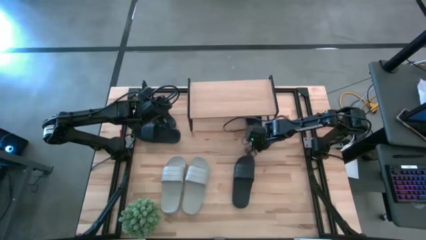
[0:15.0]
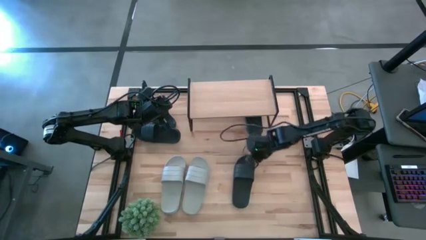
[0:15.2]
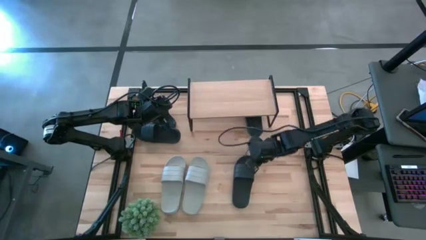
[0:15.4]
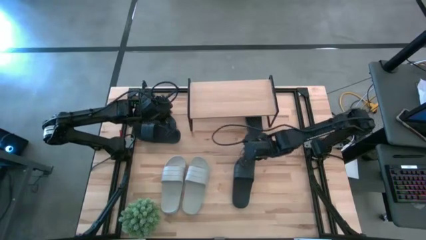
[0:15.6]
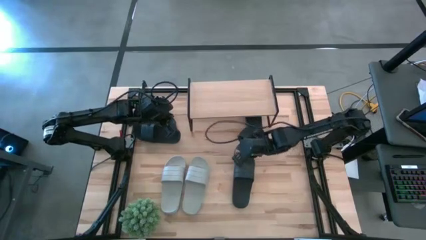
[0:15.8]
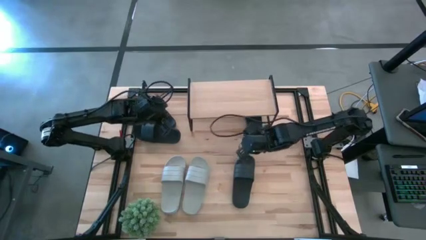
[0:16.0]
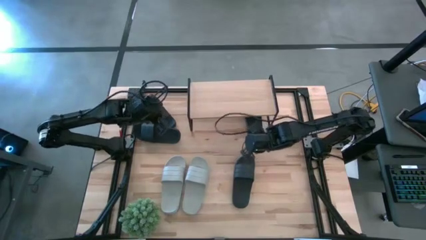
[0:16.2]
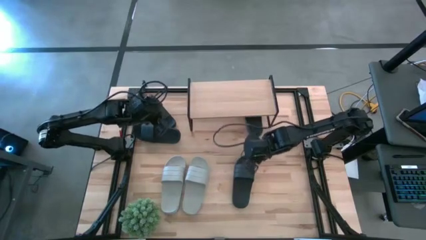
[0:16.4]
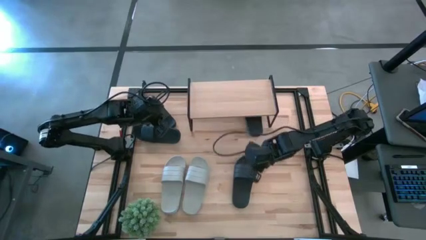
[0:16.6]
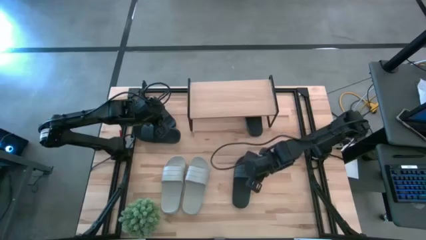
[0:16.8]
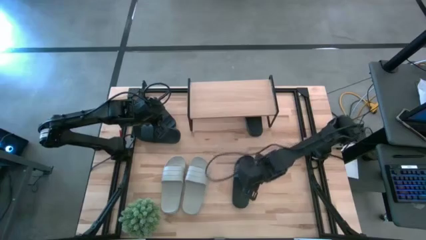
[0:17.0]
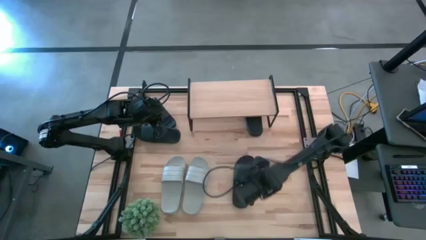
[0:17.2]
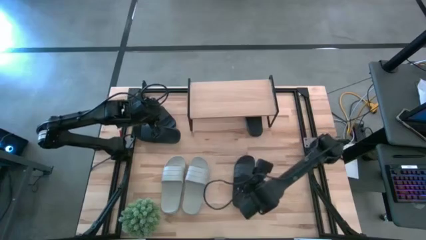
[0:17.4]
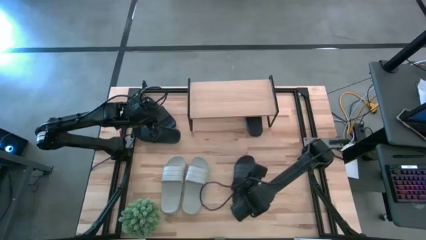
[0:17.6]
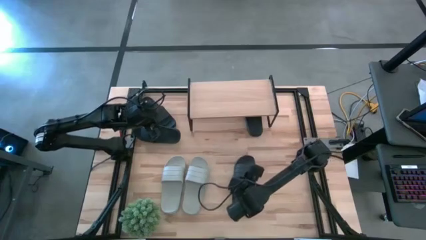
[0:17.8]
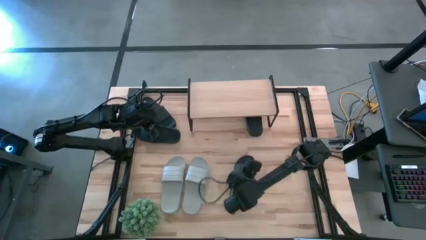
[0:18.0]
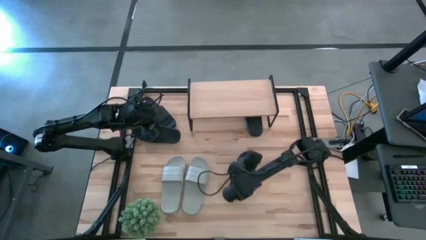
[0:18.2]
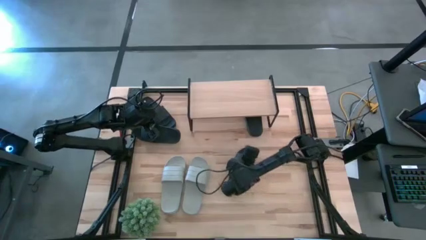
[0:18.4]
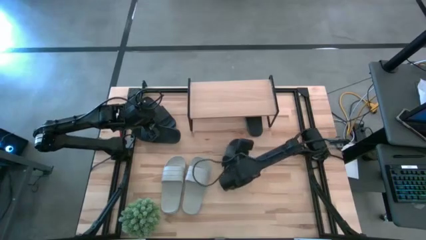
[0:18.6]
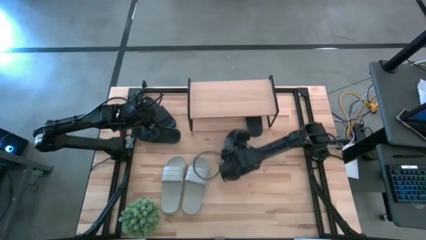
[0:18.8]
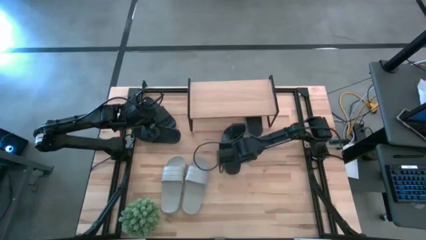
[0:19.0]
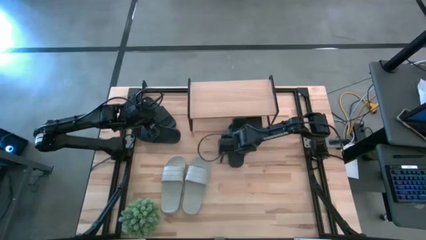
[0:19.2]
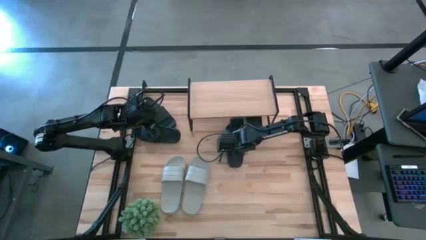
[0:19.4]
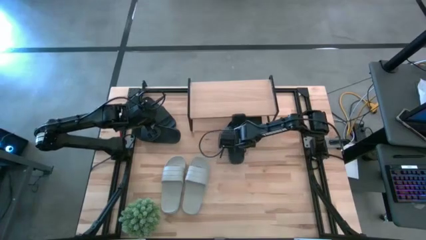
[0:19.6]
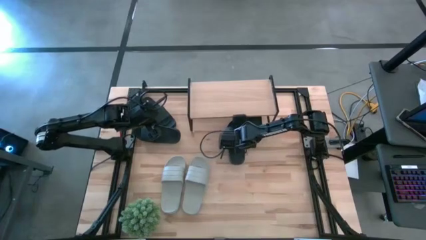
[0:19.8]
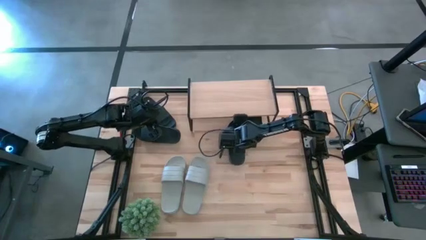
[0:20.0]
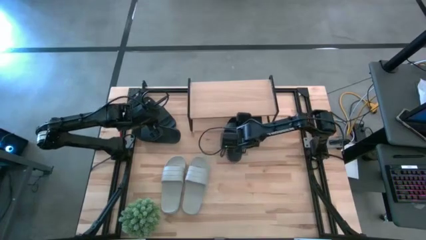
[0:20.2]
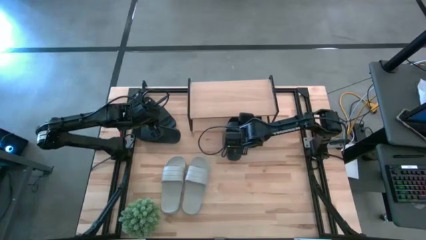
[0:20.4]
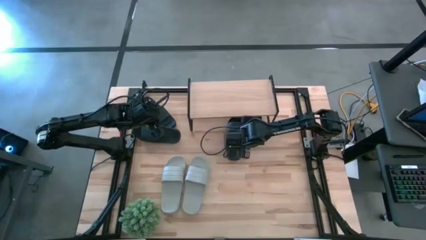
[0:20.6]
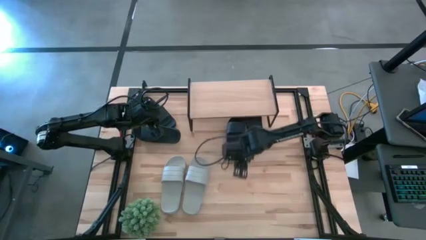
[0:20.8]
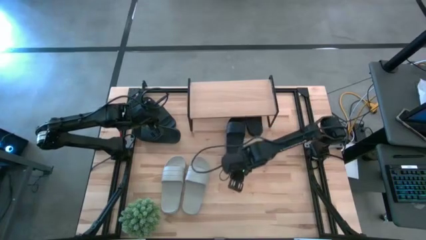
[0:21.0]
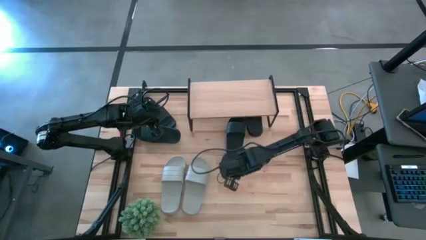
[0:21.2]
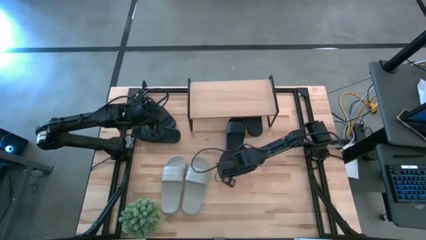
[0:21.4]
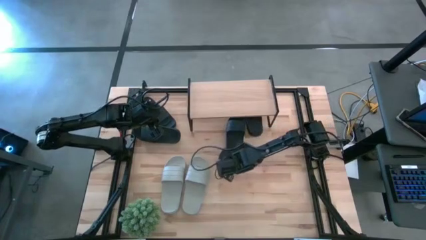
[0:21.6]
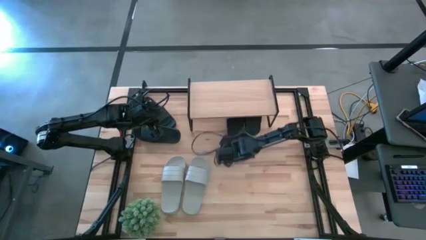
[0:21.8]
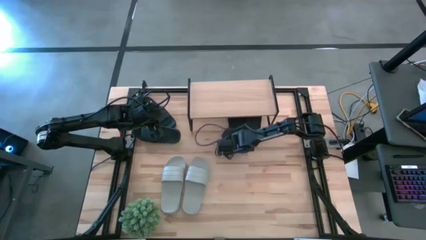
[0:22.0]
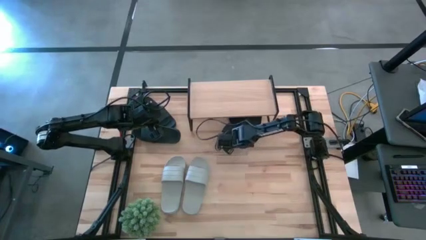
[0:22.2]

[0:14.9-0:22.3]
Task: Pick and place slides into the shelf
Put the black slide under the shelf

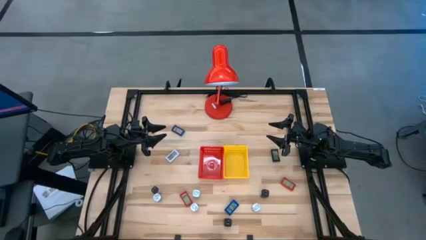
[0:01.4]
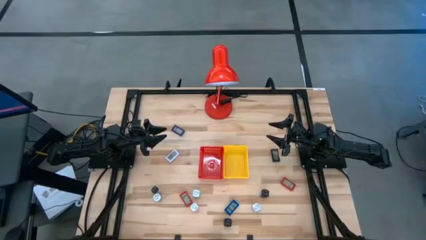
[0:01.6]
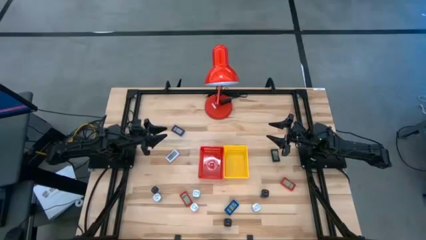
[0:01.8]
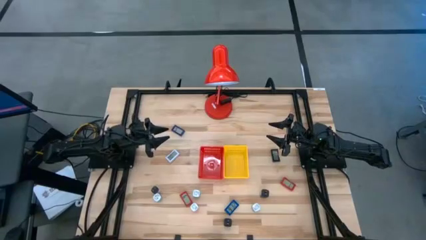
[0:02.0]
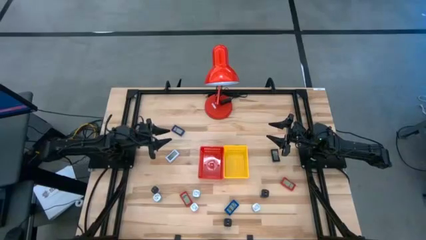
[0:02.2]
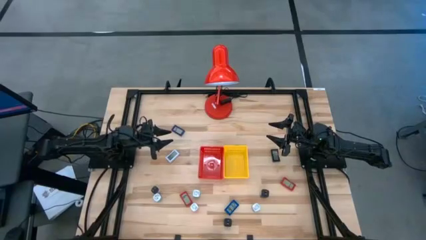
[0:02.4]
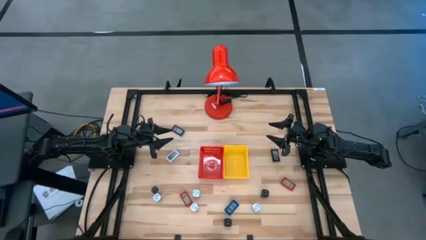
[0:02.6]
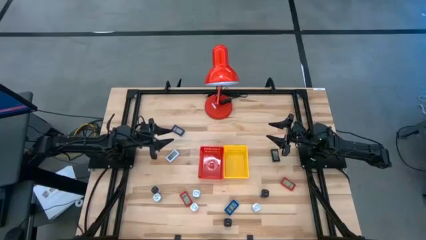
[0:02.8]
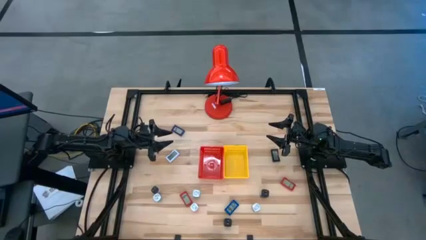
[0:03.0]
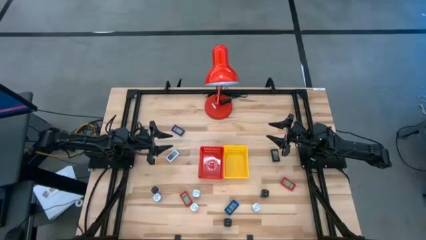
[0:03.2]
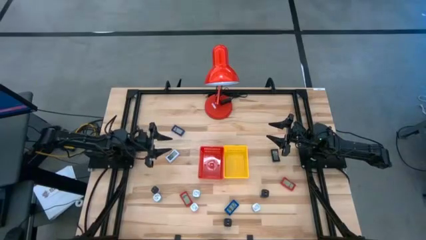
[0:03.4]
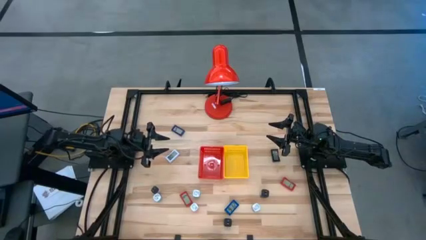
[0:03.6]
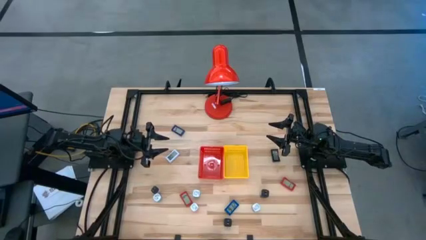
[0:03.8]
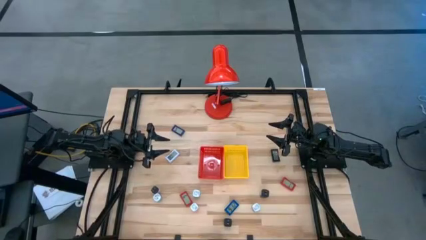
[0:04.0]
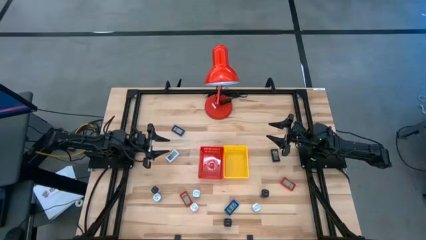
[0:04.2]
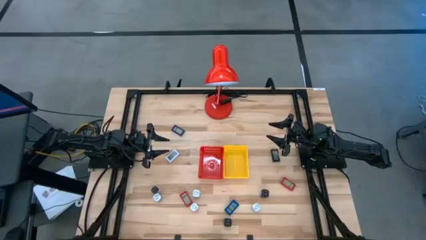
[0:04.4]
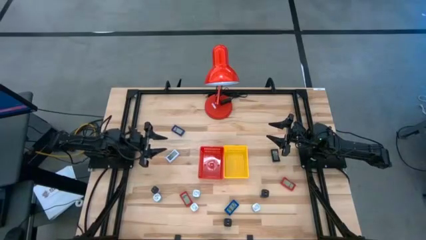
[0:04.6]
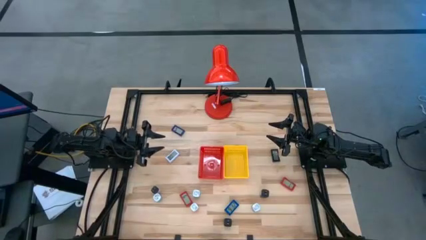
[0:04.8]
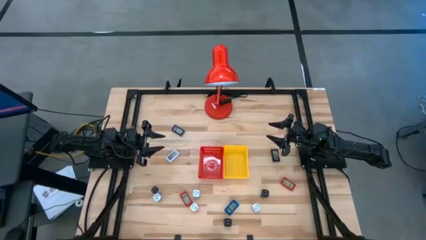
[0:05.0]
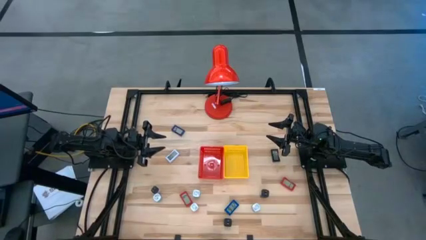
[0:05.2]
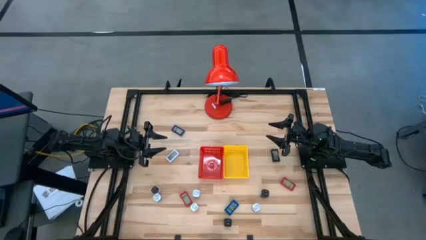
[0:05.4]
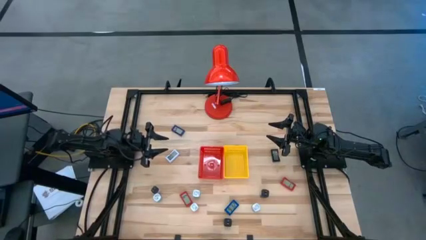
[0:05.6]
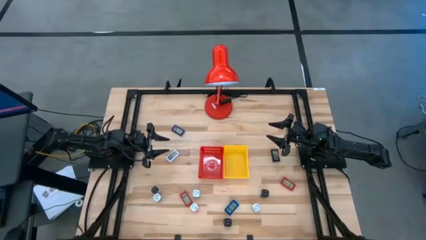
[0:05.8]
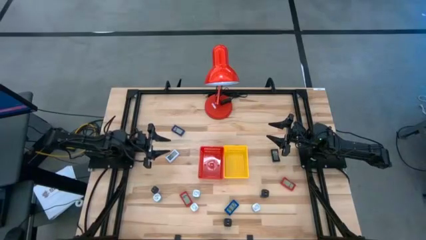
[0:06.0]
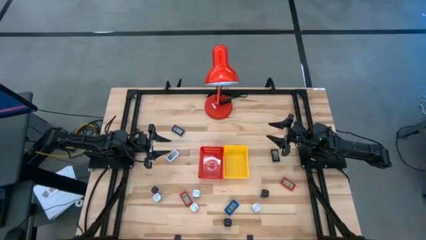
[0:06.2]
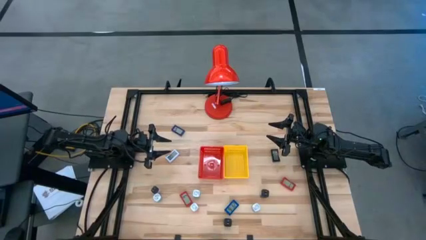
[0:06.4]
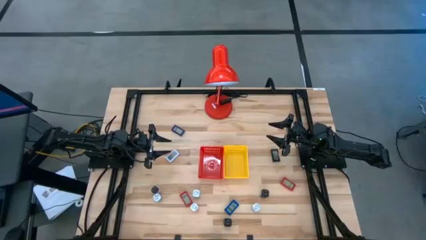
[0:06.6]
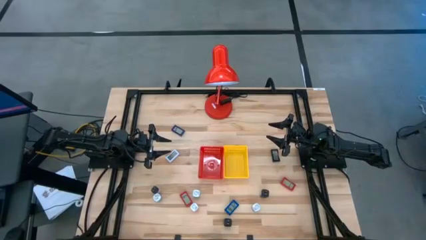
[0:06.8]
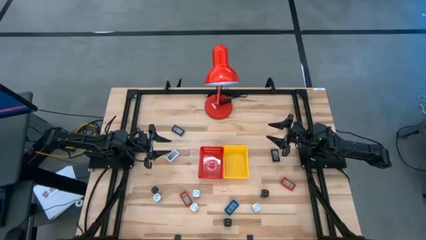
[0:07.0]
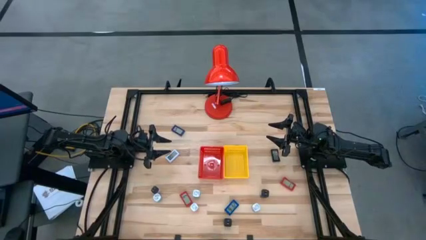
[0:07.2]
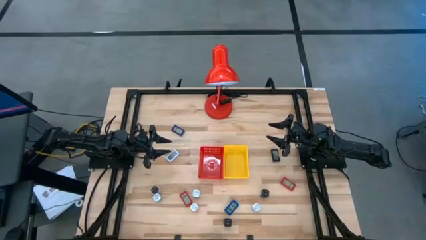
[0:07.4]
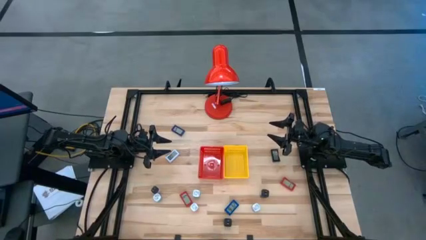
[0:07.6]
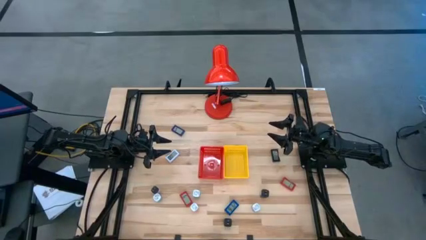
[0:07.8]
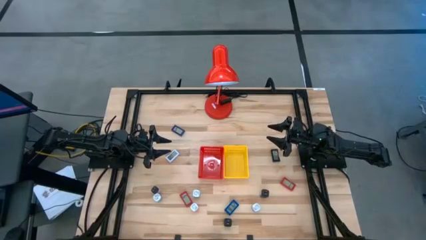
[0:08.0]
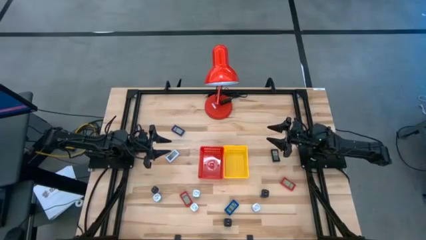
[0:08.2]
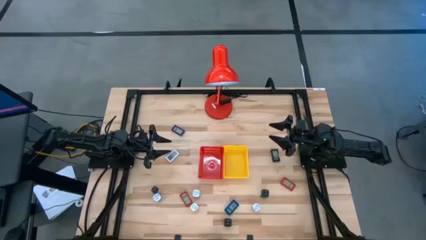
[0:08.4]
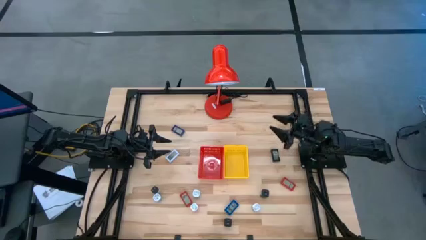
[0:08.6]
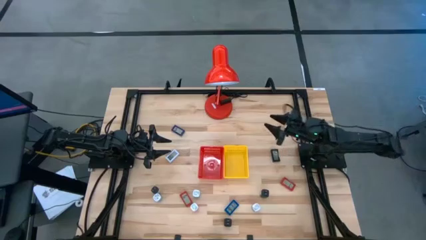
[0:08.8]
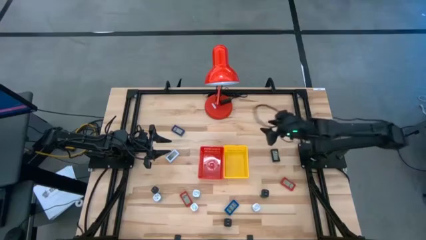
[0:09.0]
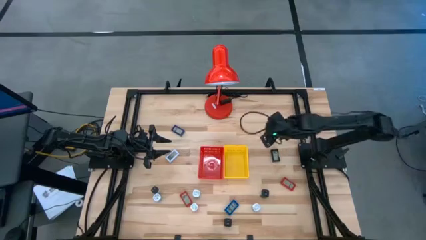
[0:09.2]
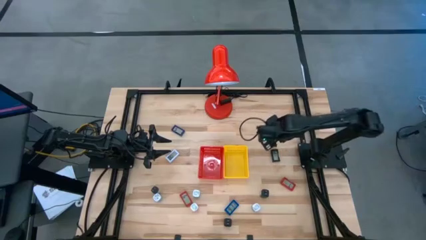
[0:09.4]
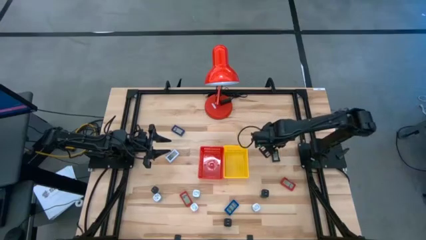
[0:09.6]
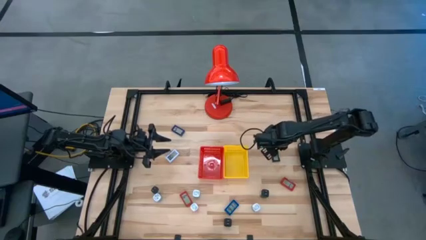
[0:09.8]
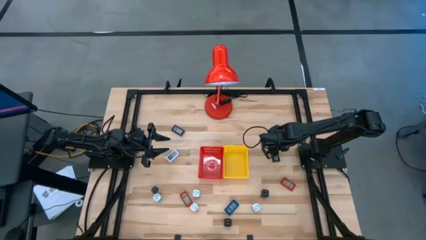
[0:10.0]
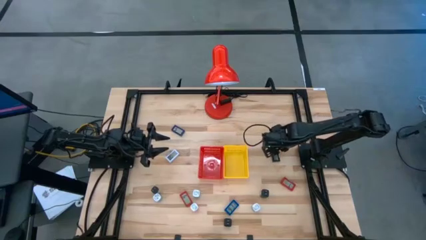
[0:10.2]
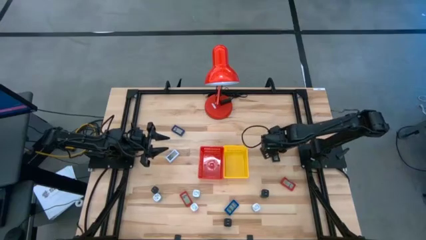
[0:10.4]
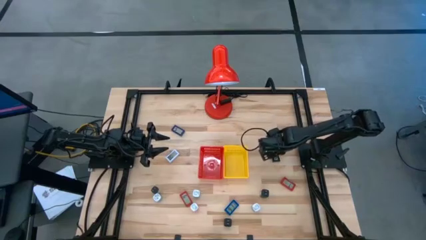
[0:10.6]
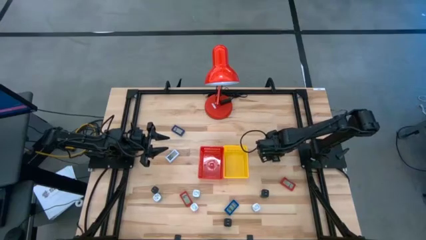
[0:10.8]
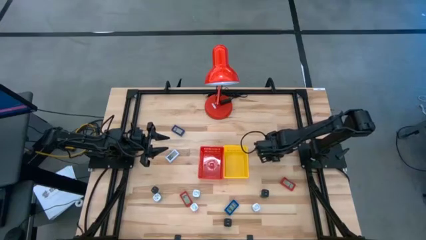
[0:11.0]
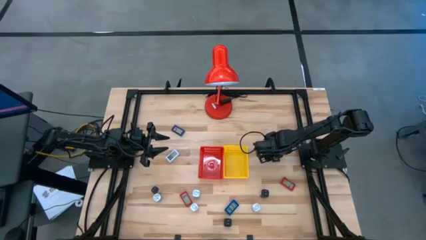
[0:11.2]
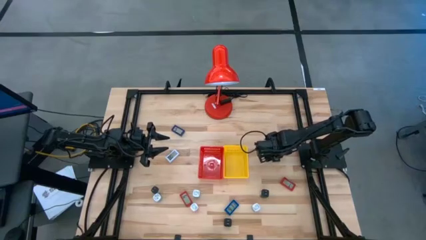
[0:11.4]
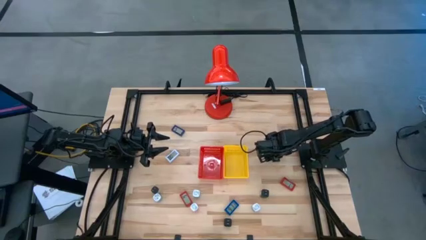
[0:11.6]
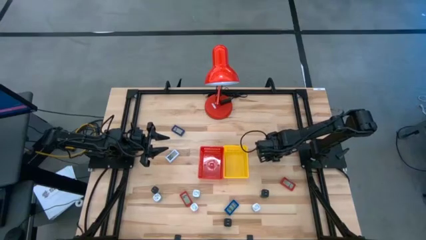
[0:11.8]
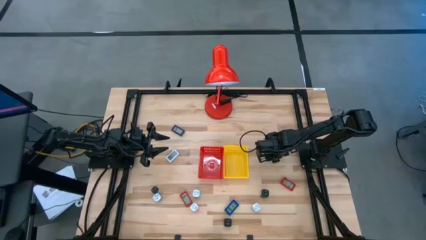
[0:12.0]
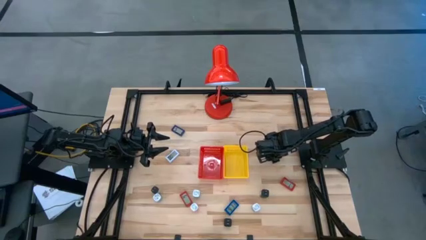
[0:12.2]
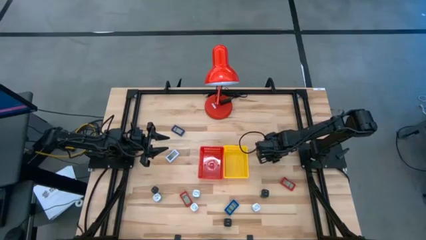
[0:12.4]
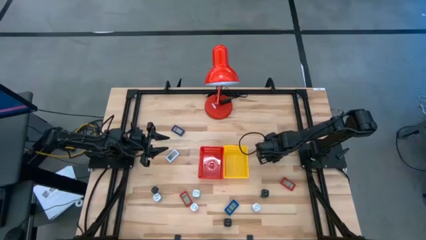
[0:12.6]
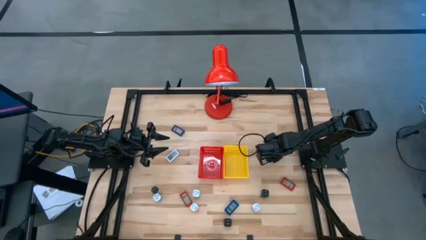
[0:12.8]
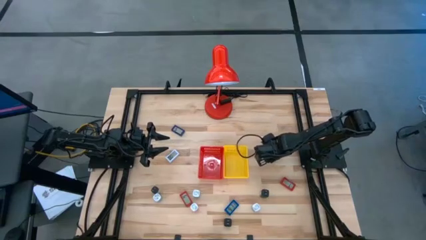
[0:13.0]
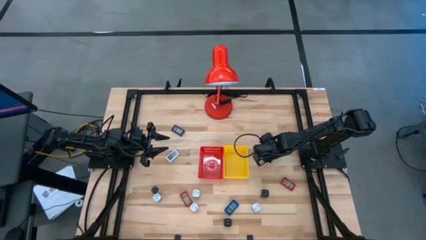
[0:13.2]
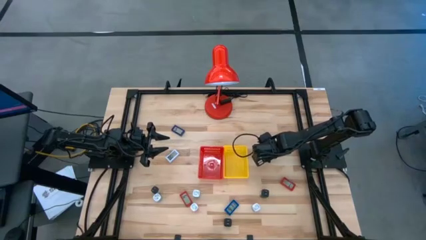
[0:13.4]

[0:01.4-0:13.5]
Task: Pick & Place Office items
Put the black digital timer into the yellow bin
